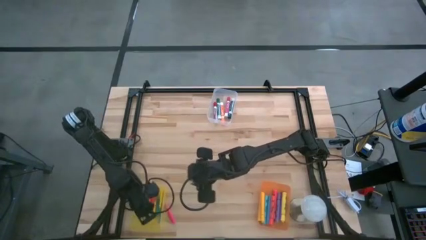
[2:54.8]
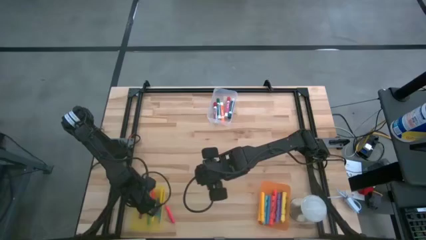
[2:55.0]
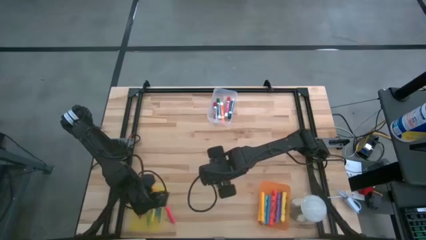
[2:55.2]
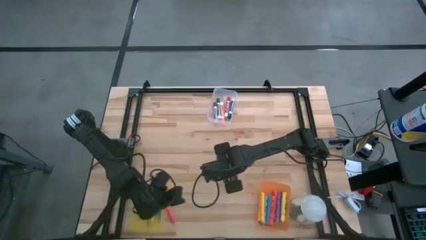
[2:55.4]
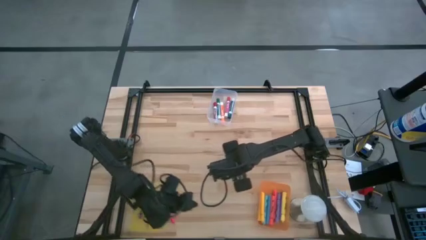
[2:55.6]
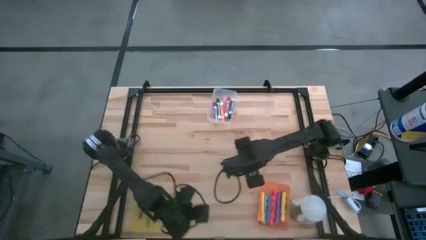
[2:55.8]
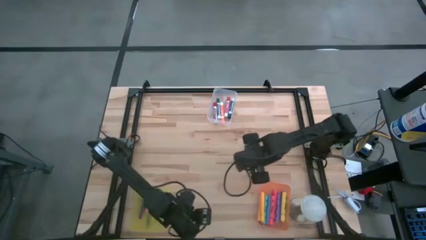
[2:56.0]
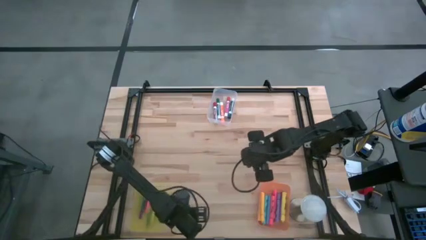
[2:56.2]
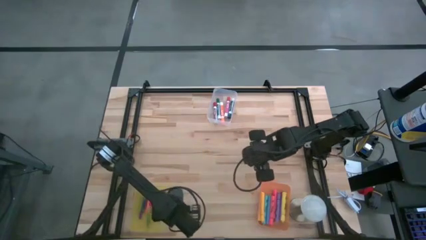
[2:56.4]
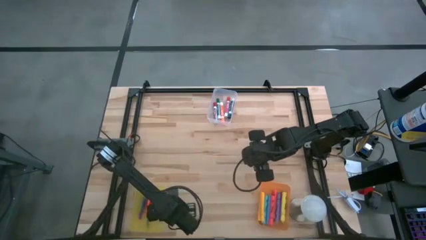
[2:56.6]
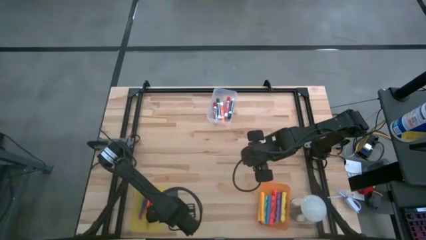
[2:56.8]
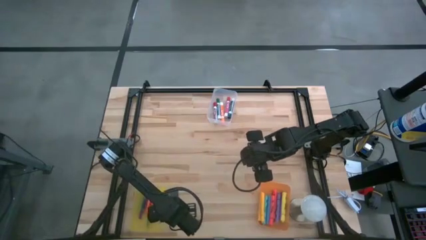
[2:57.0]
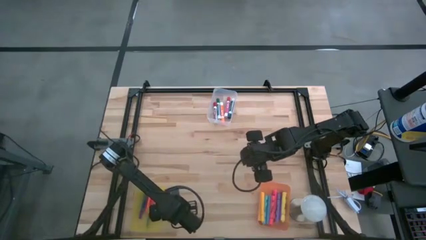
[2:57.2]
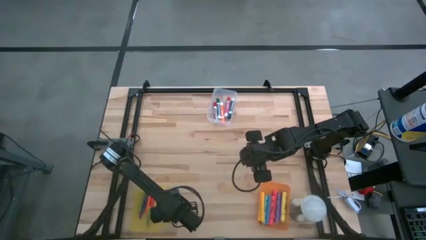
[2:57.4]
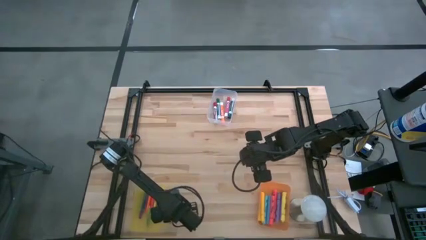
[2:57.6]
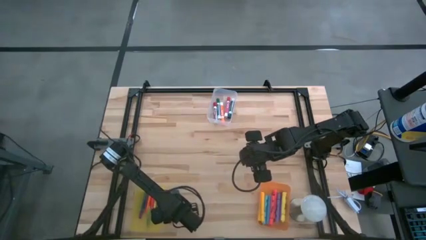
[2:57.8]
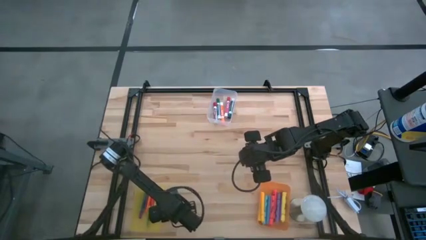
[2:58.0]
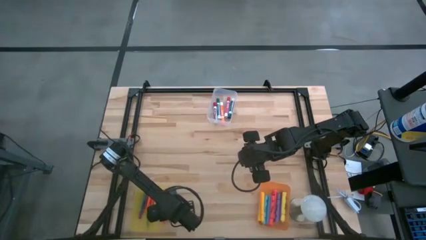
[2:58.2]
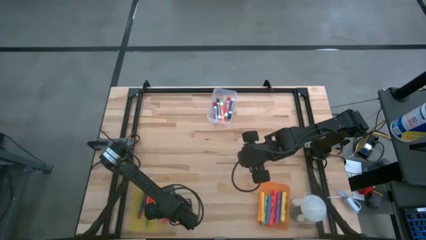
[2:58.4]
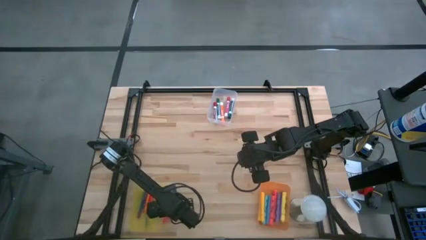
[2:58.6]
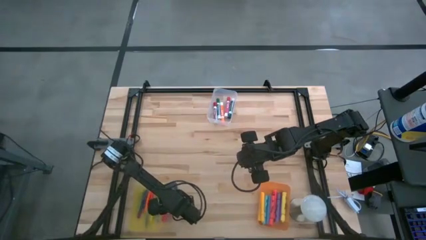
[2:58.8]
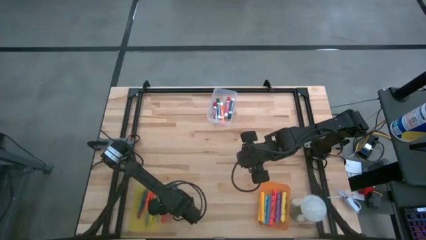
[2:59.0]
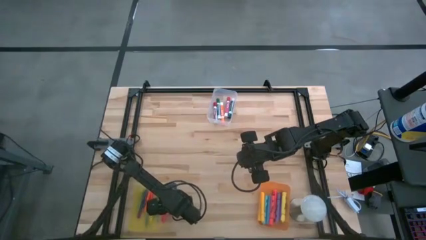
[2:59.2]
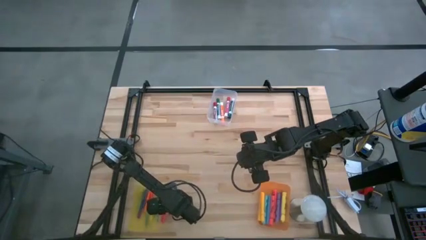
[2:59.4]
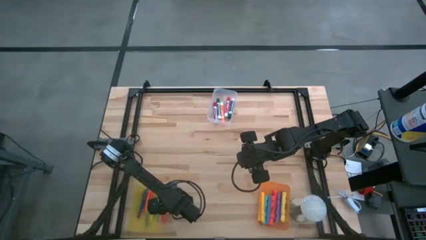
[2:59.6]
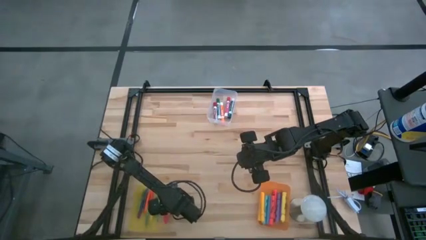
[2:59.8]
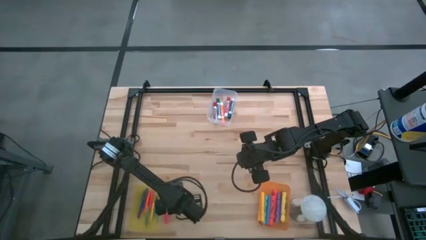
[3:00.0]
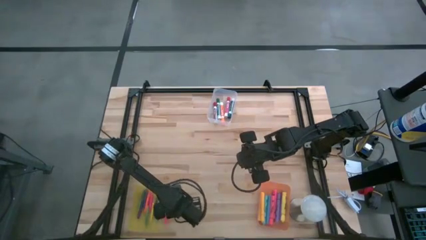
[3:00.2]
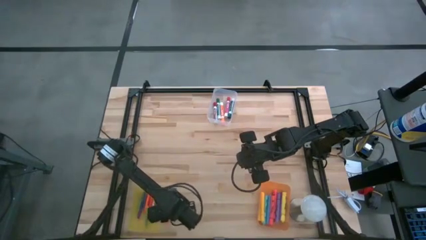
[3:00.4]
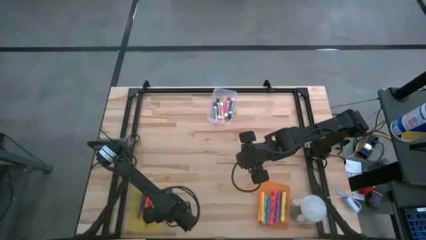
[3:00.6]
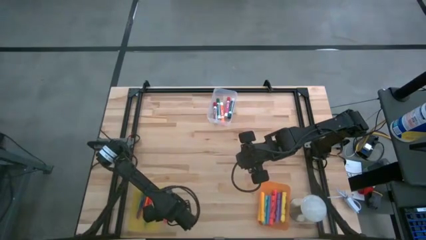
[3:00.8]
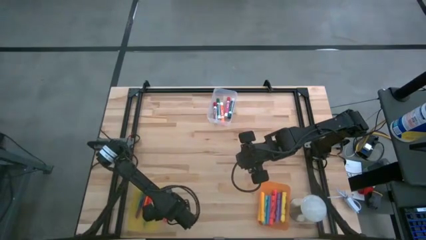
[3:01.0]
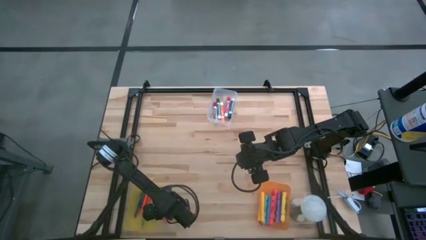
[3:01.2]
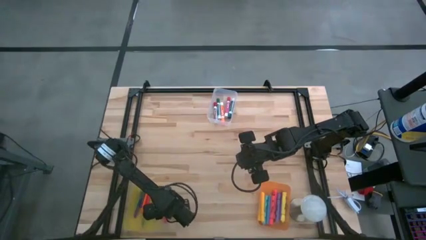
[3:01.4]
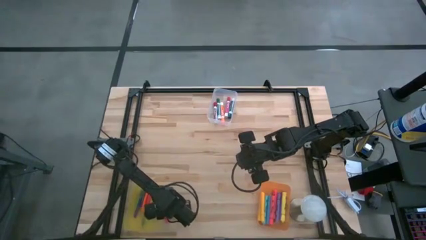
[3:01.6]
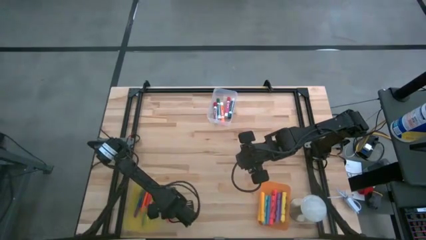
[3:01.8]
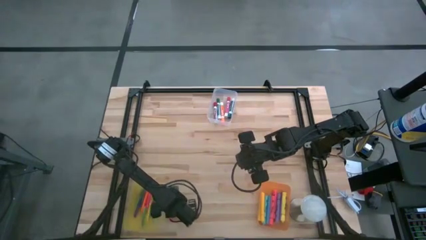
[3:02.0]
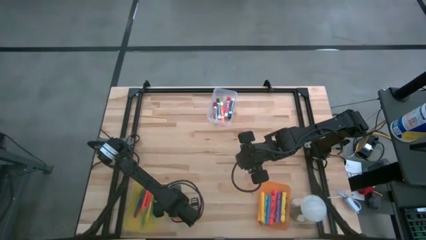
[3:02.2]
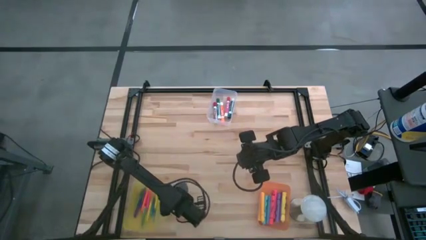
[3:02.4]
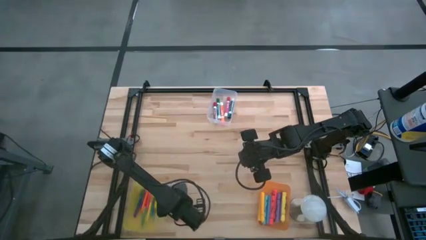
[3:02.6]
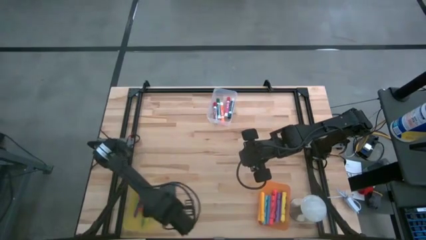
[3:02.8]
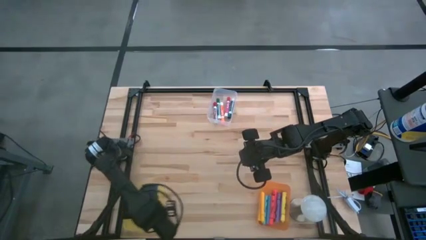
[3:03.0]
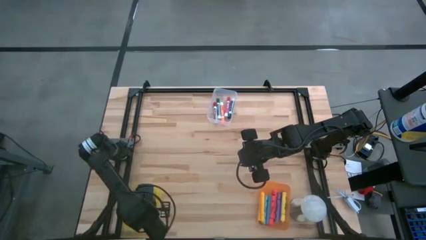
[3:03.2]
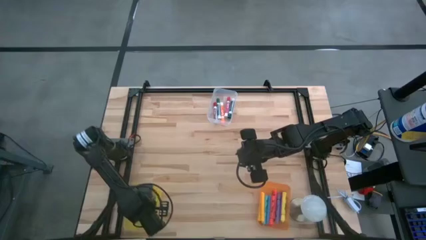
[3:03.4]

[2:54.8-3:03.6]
Task: Pick & Place Markers
Put the pink highlighter into the yellow bin

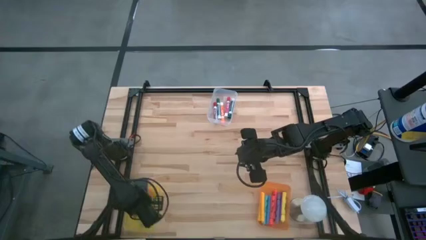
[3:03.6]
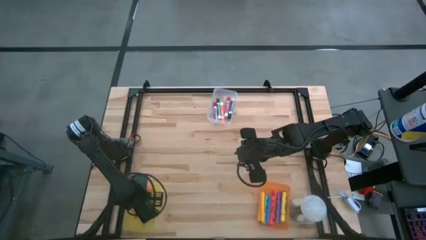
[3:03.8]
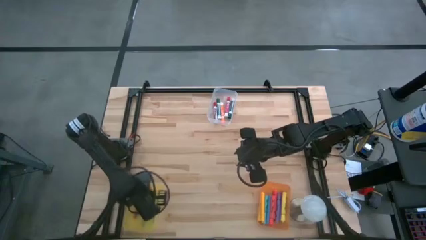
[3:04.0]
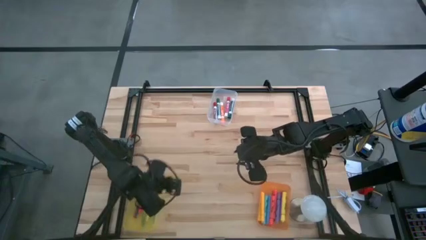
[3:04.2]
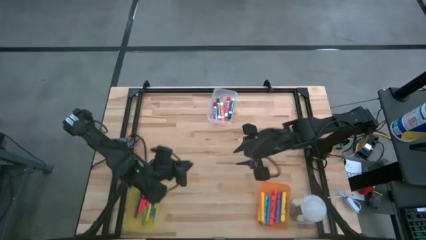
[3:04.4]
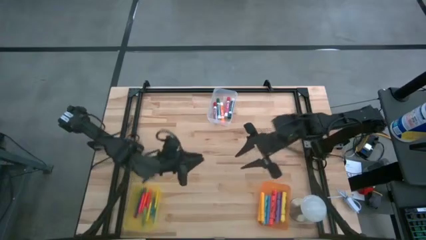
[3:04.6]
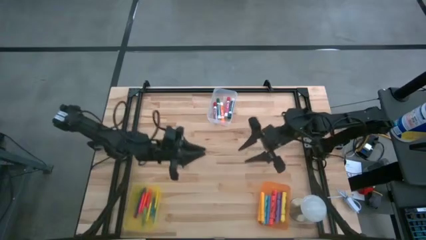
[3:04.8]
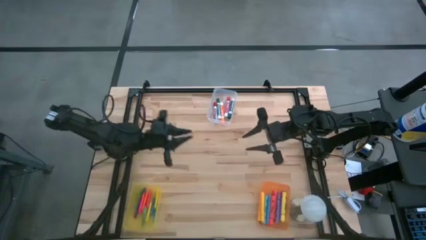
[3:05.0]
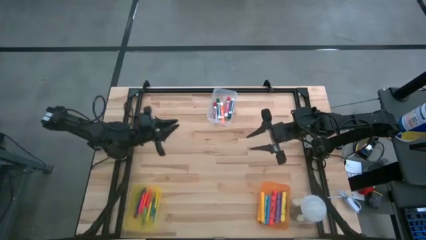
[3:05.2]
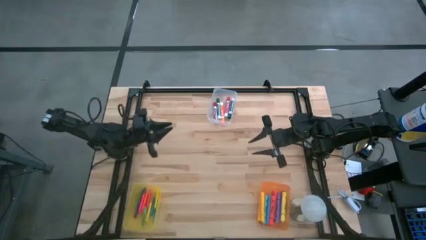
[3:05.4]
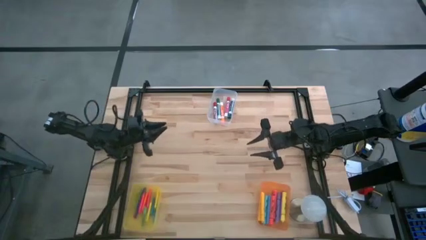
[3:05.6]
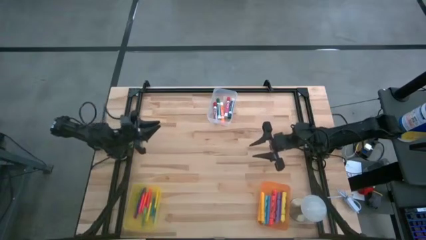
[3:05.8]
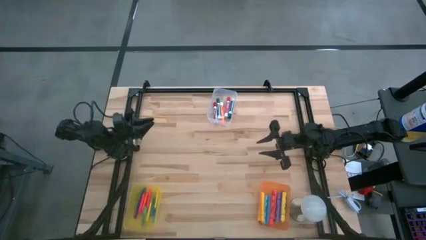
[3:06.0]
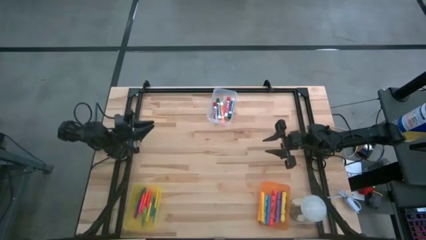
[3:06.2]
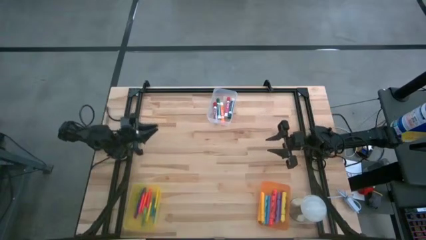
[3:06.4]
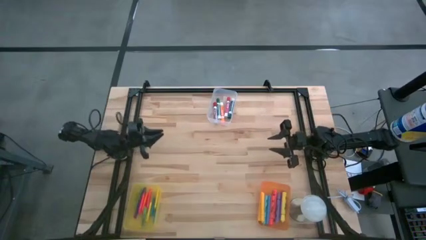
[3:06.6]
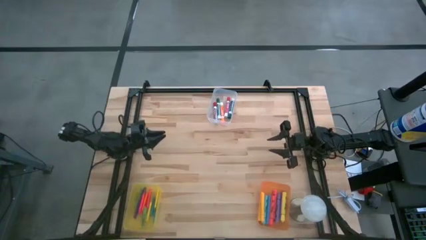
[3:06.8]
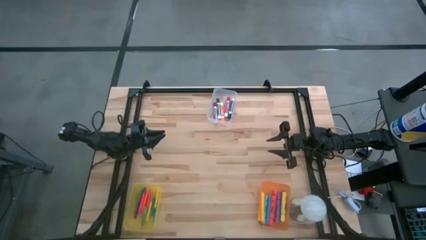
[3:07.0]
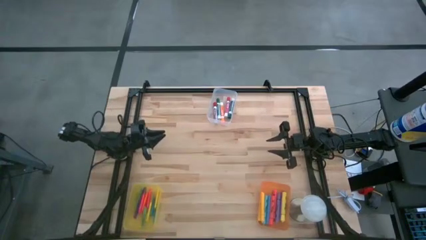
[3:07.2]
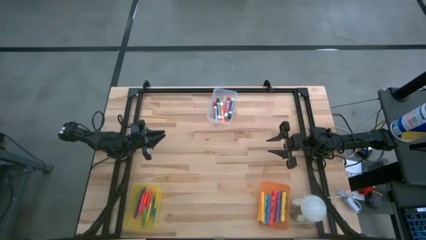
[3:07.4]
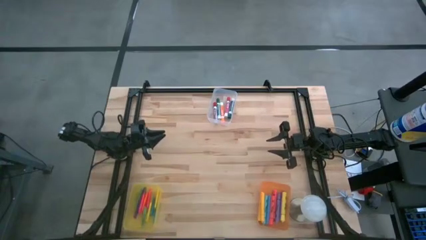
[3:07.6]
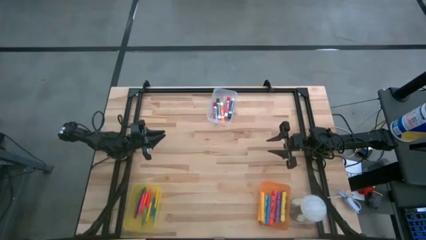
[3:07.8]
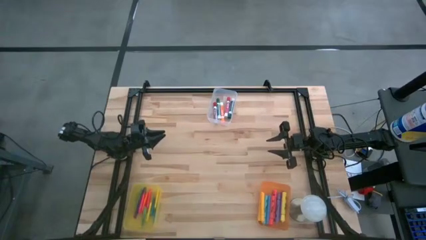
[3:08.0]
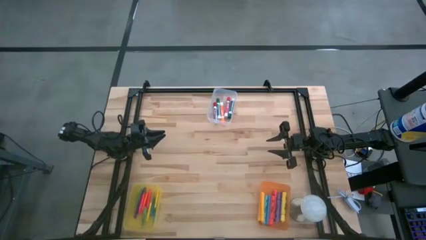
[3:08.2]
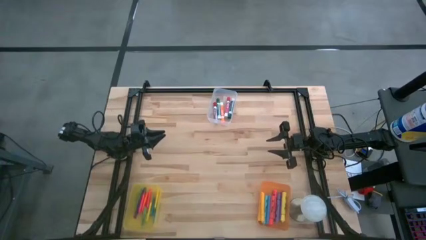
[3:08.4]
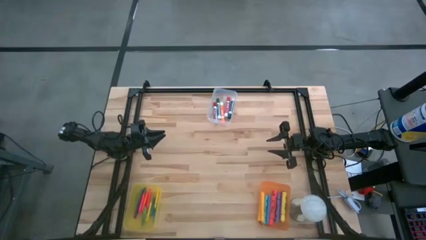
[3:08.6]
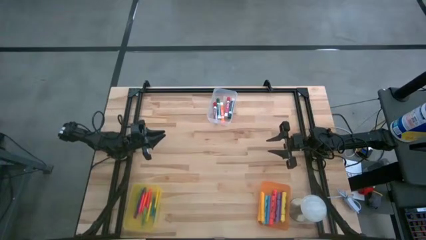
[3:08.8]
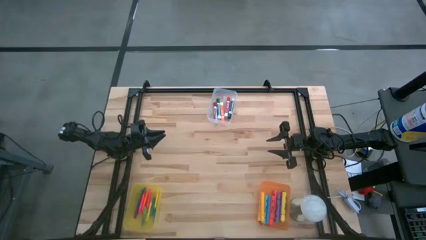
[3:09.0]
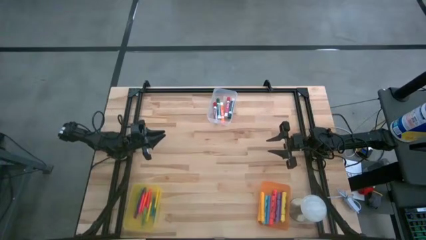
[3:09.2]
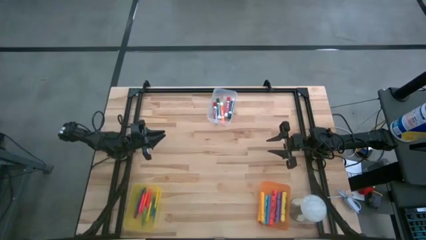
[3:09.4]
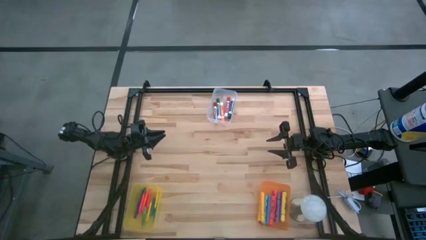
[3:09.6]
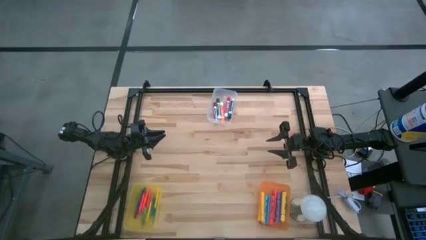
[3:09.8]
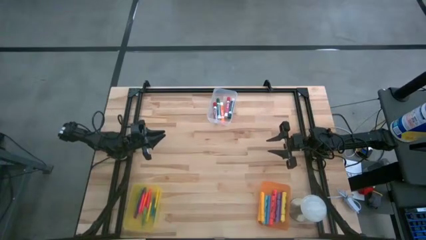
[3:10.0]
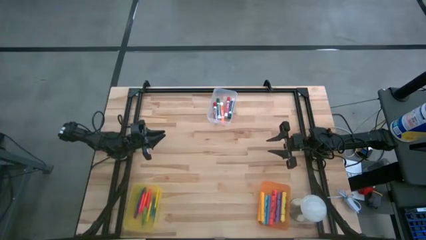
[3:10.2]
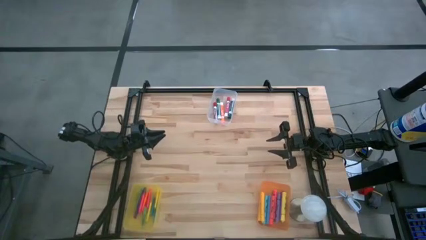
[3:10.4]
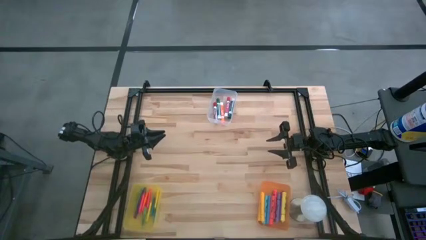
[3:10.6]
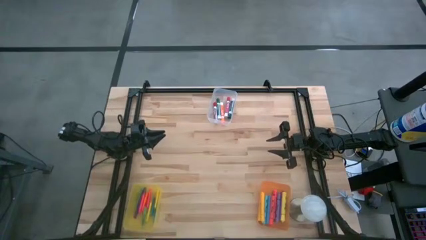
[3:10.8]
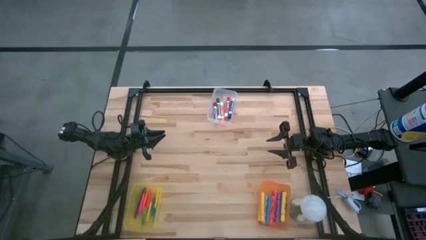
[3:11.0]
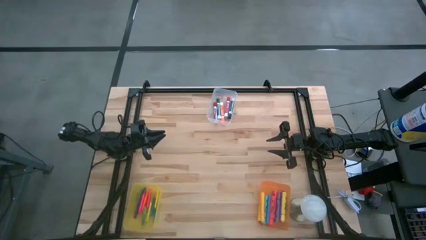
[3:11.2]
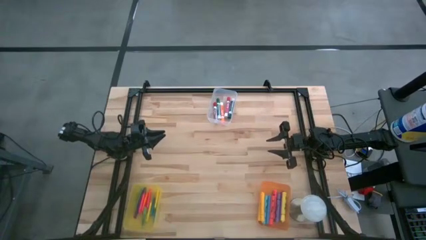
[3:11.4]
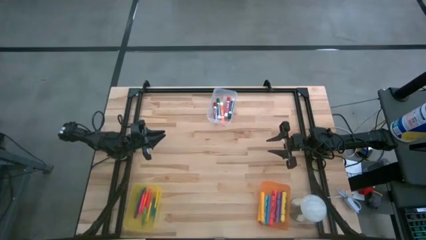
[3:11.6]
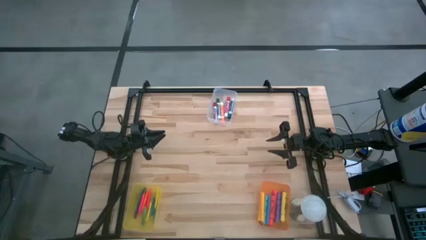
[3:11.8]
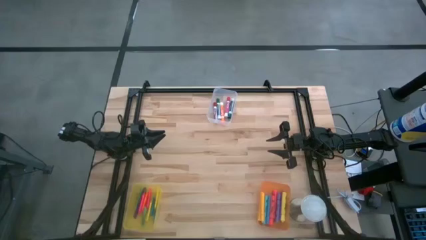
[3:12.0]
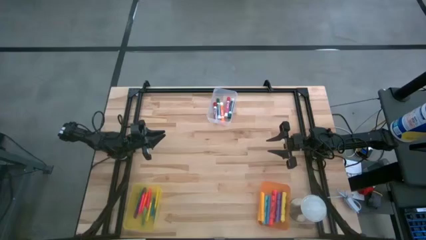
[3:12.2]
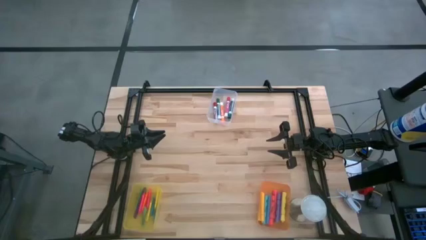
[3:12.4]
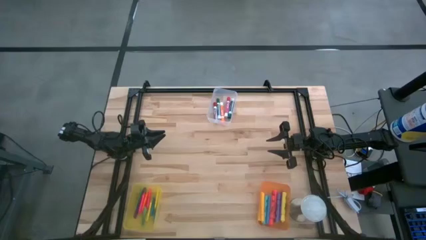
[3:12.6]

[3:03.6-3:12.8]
Return to Home Position
